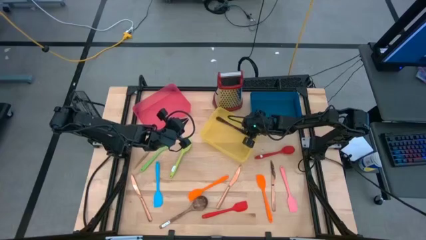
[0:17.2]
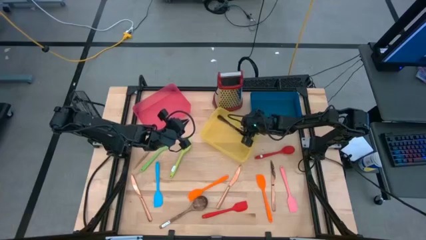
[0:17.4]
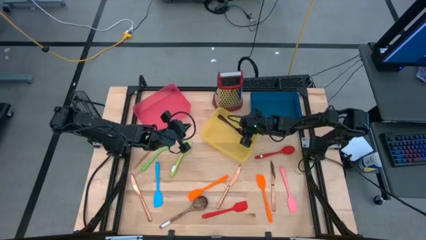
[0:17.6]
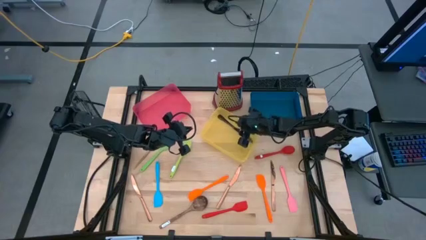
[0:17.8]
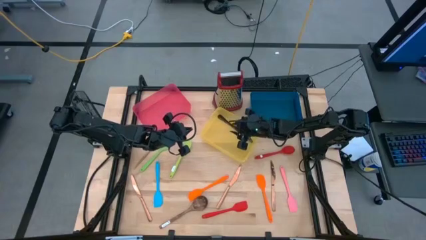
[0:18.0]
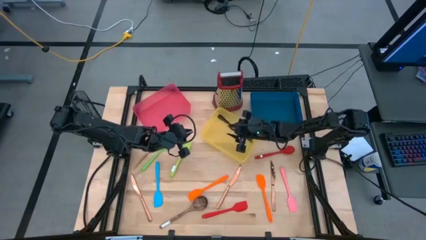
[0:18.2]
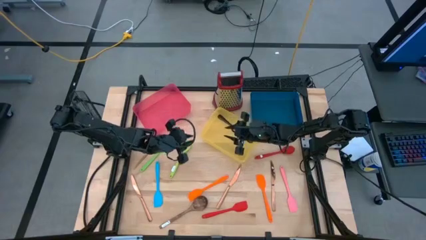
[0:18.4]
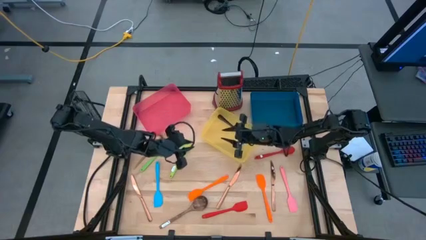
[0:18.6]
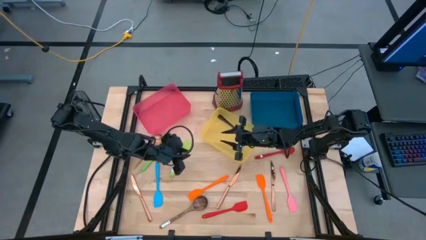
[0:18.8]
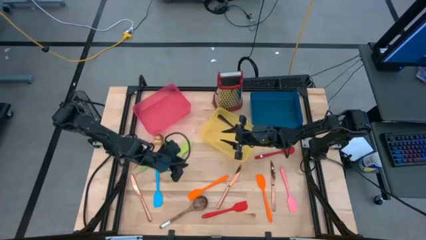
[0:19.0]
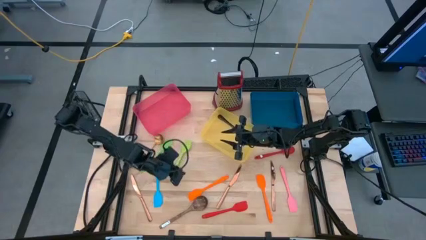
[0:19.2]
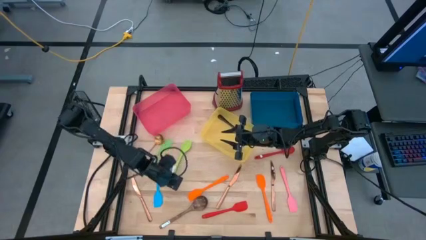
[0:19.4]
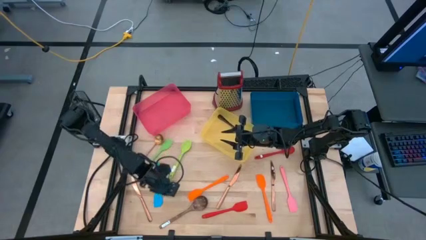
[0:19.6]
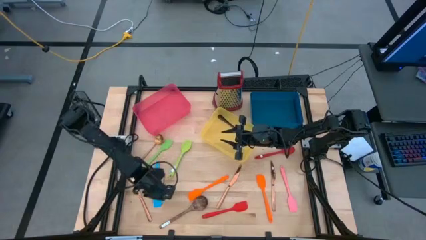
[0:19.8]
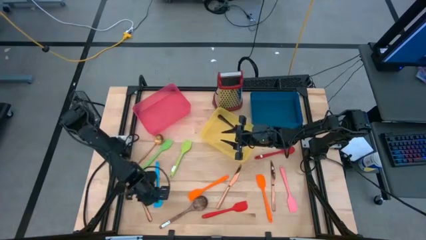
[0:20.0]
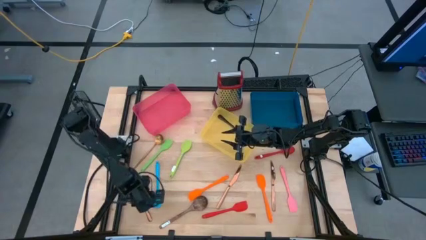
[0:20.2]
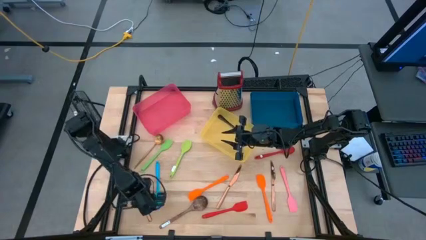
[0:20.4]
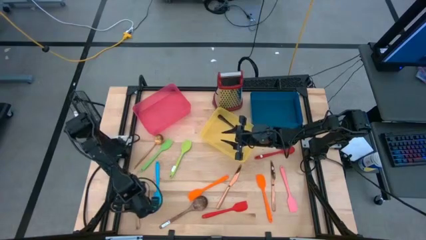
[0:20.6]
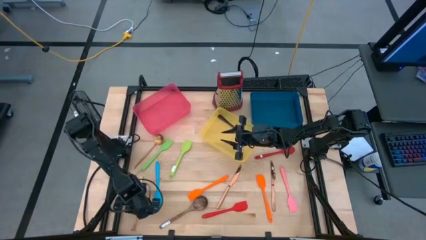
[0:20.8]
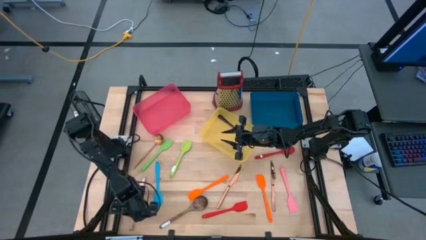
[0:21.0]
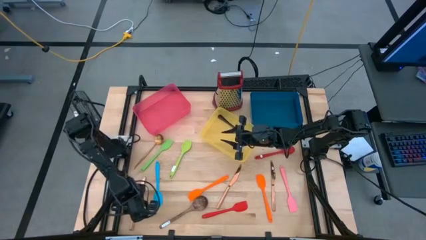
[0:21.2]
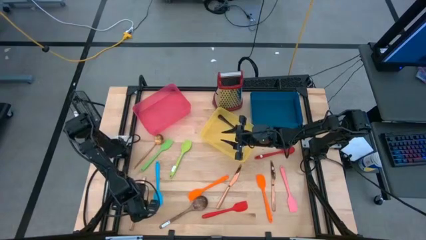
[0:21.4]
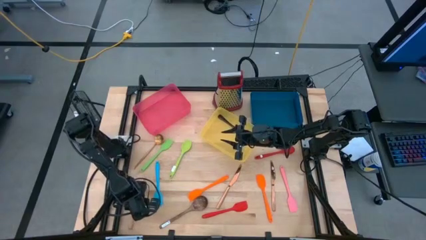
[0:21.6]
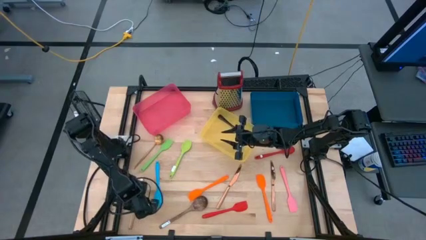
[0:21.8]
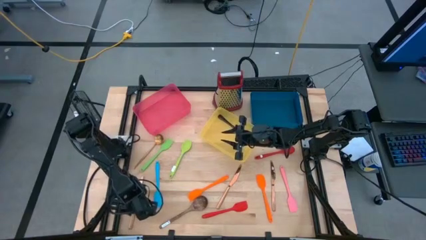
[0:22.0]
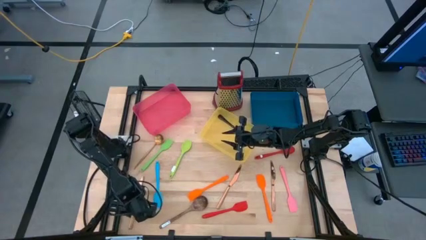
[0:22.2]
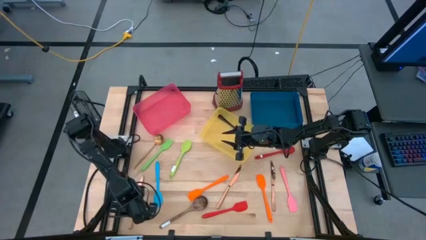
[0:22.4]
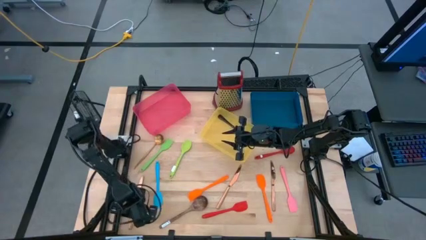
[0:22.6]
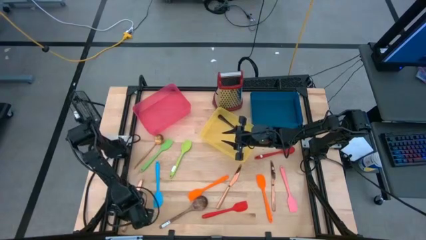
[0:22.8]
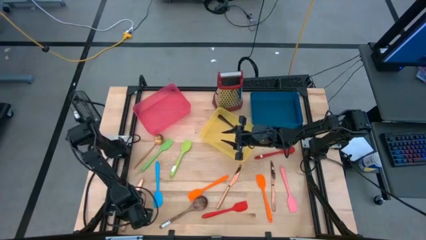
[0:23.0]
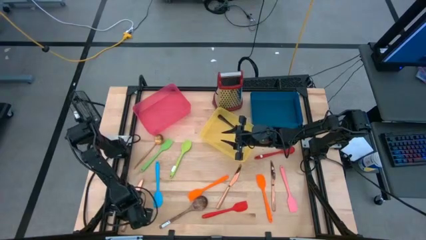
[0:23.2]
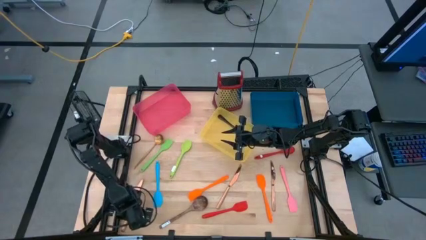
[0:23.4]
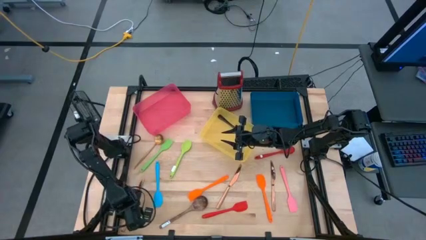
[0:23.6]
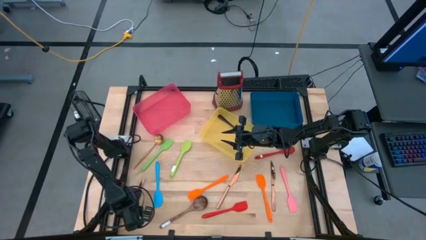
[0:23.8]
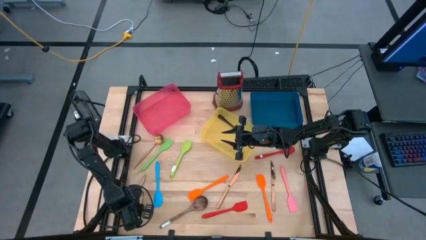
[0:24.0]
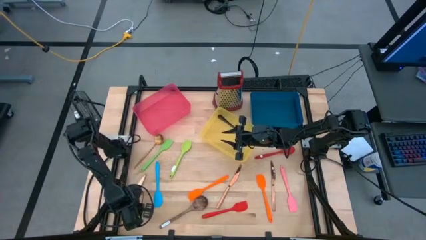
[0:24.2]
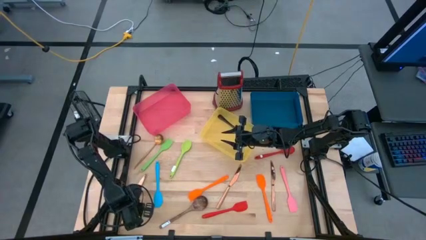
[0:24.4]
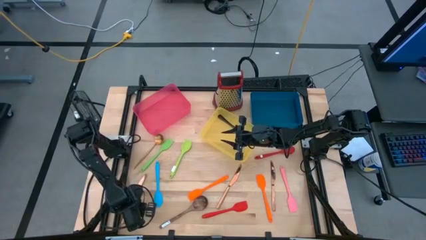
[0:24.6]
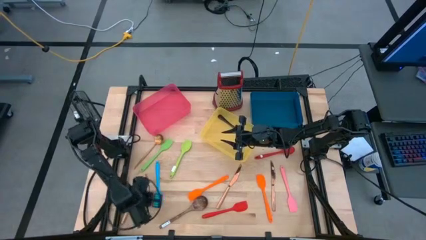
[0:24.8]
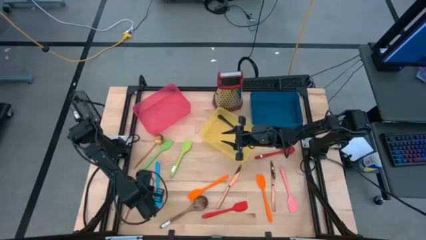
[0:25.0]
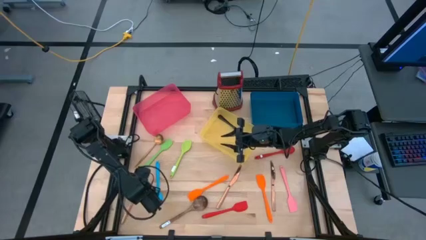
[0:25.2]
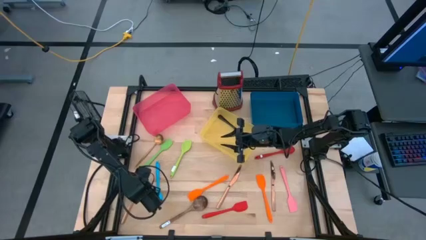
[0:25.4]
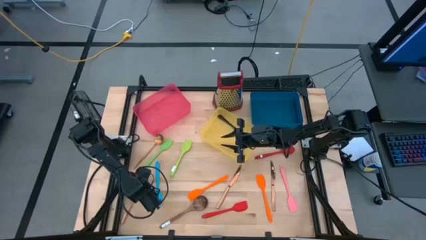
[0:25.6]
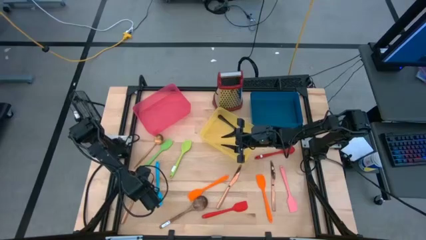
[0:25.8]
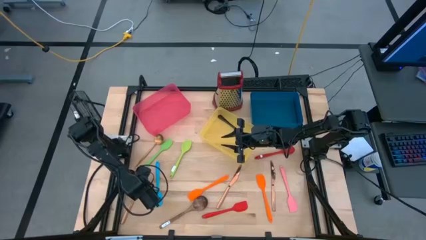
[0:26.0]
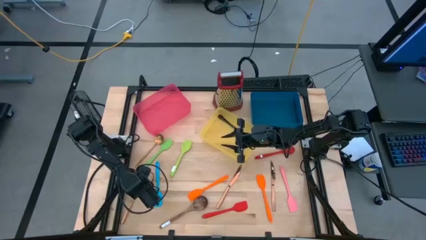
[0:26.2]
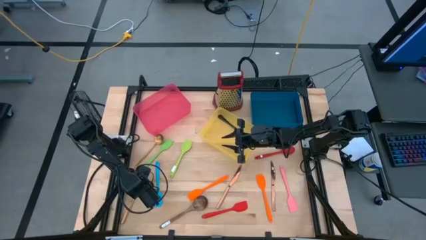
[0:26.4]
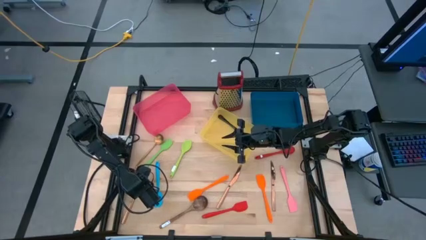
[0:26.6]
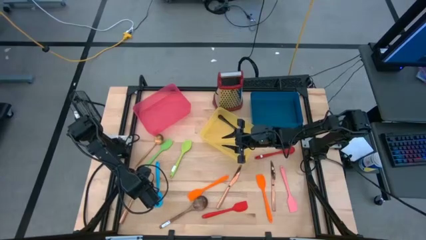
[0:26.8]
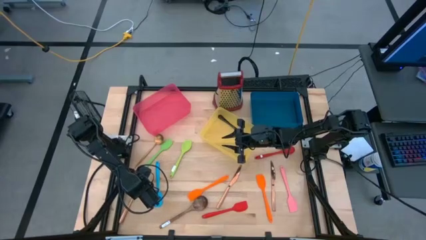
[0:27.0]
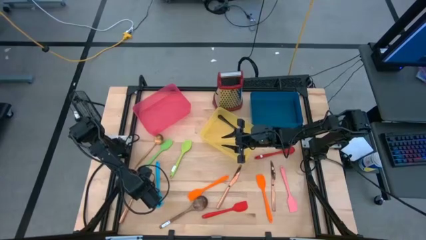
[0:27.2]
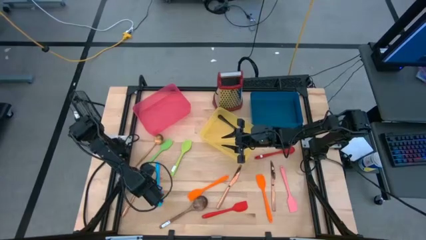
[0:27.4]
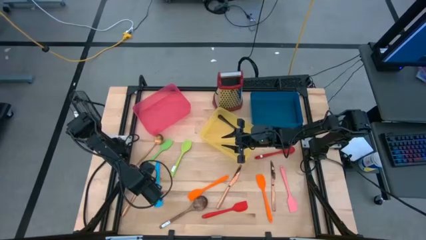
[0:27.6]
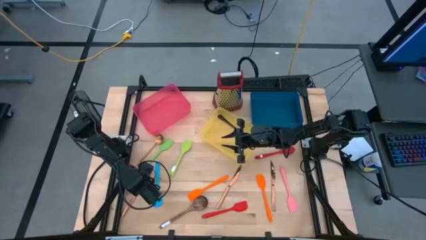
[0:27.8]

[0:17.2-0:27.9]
Task: Pick & Place Kitchen Items
Put the brown table knife into the yellow bin

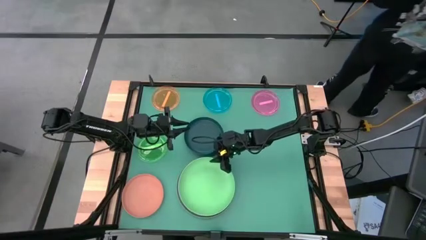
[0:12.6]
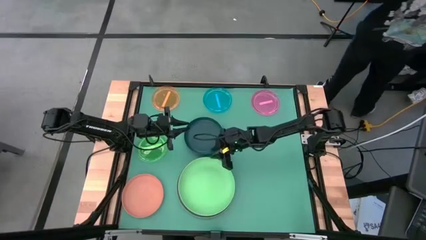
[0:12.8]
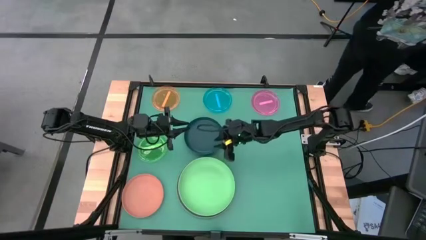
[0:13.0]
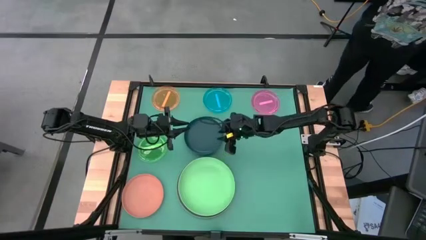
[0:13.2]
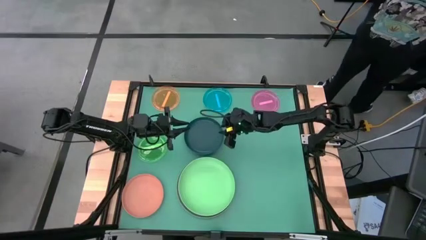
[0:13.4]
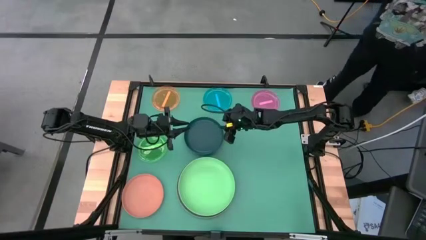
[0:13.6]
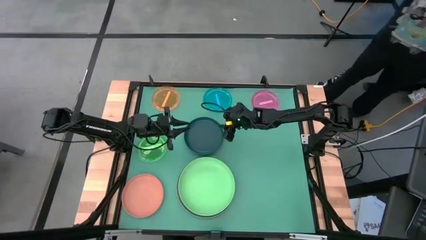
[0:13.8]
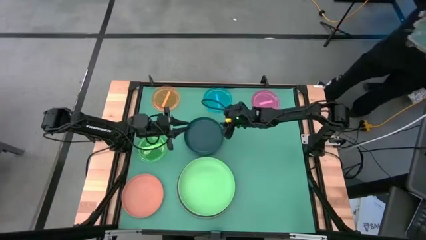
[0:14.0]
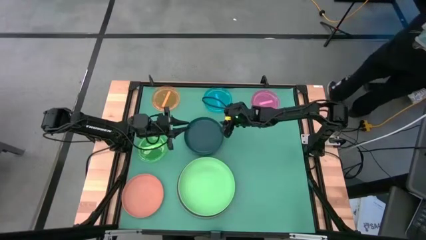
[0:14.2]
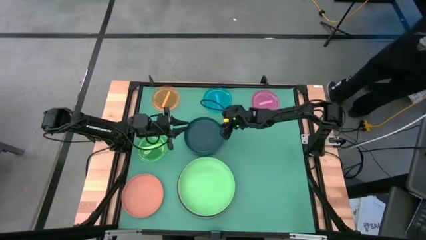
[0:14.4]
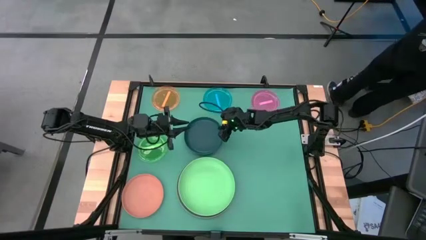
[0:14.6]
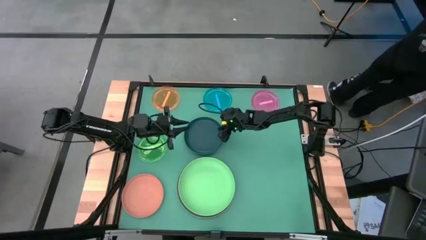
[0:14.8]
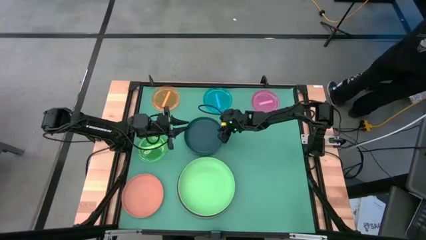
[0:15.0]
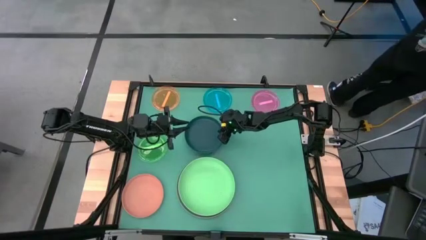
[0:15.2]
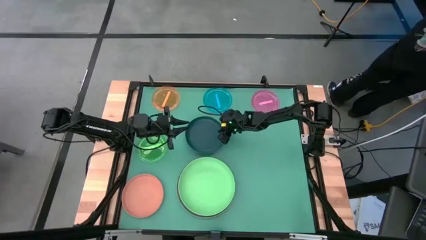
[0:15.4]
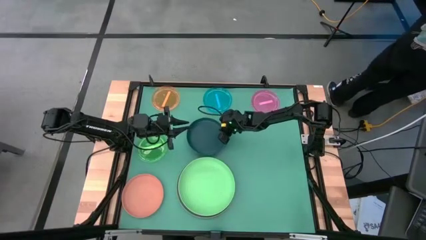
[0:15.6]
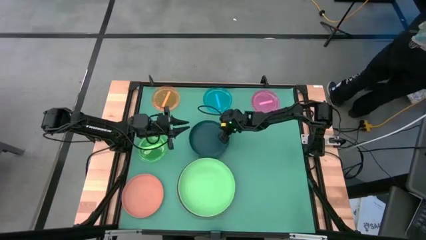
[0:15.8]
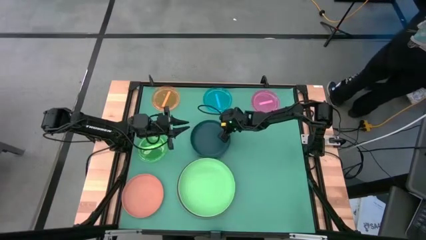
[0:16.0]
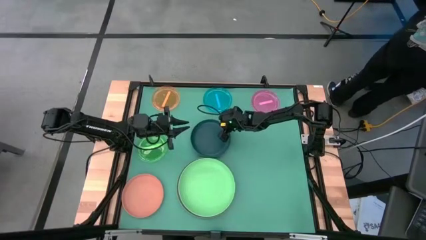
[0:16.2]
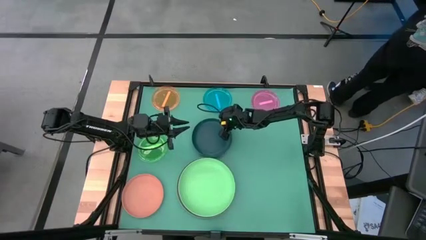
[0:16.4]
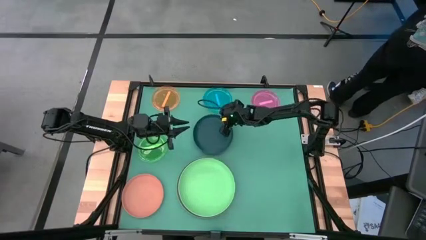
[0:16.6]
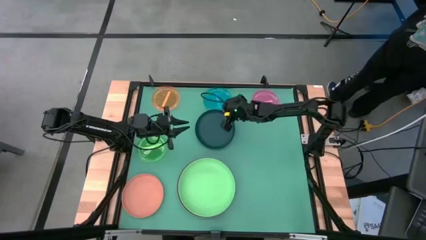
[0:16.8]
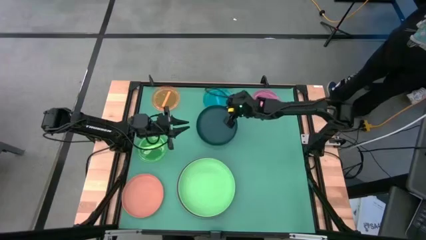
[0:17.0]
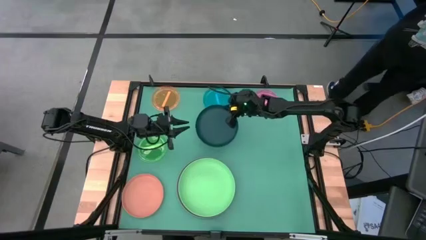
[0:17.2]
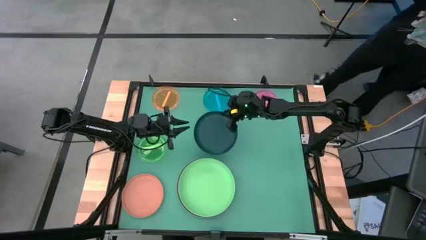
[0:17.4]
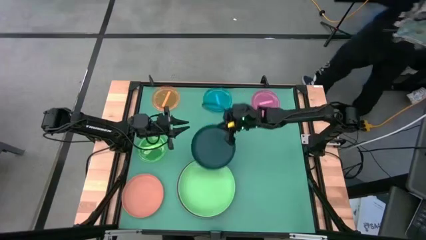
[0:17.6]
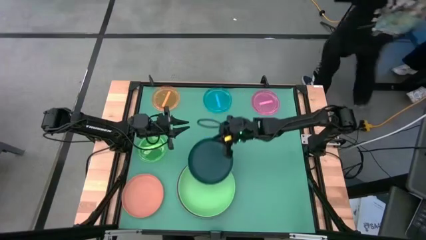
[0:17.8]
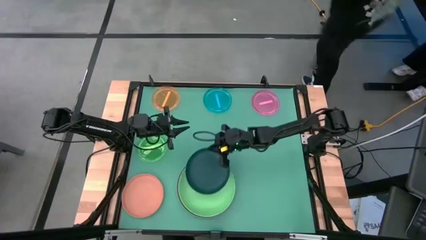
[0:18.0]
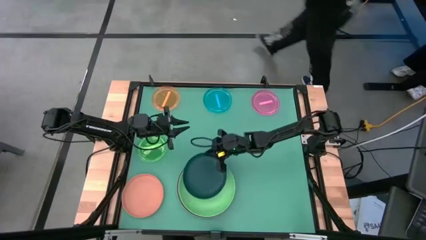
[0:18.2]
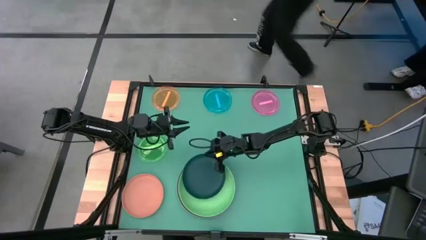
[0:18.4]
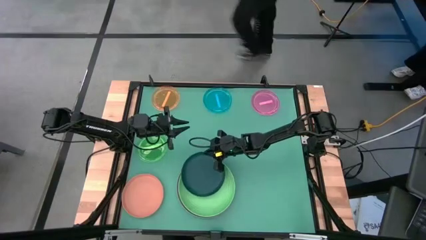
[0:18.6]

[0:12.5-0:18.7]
Task: Stack plastic plates
Stack the dark green plate on top of the green plate
